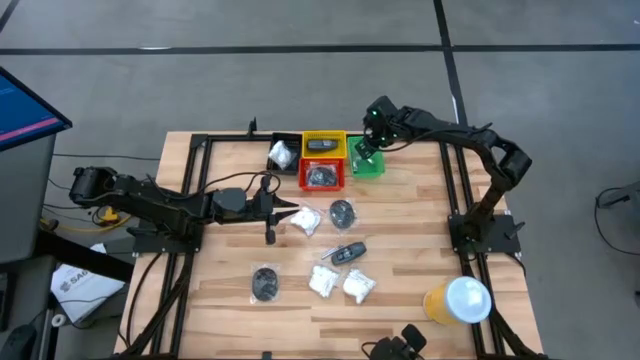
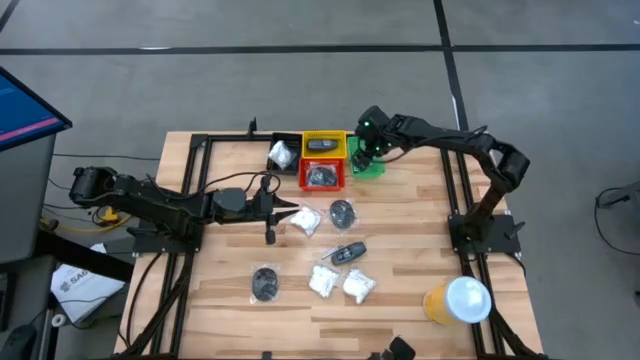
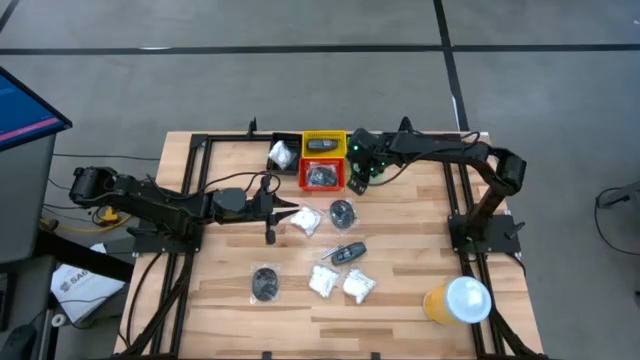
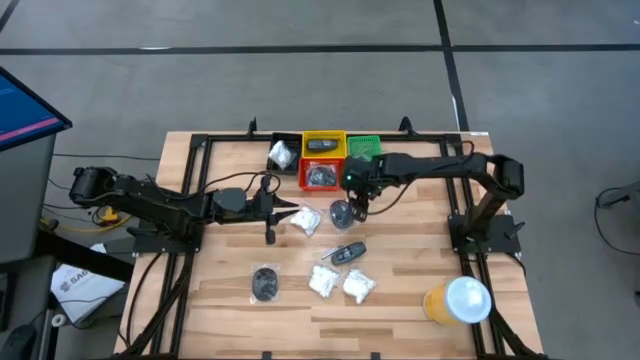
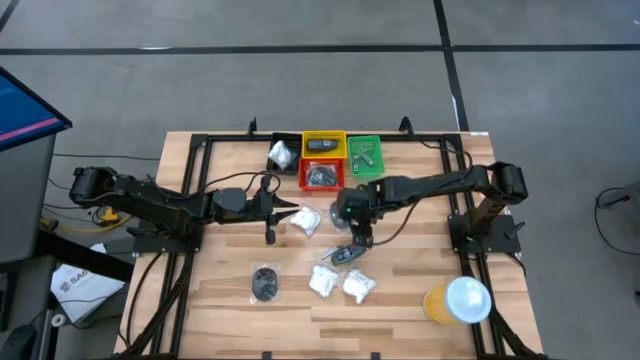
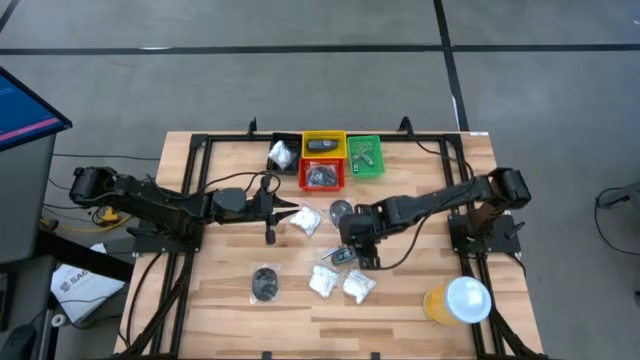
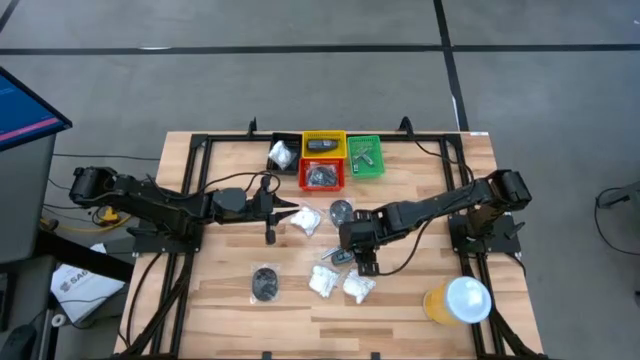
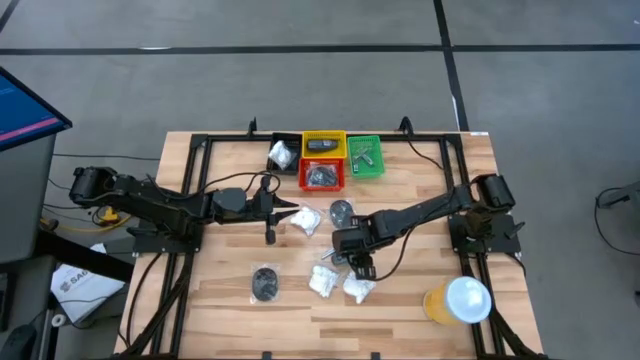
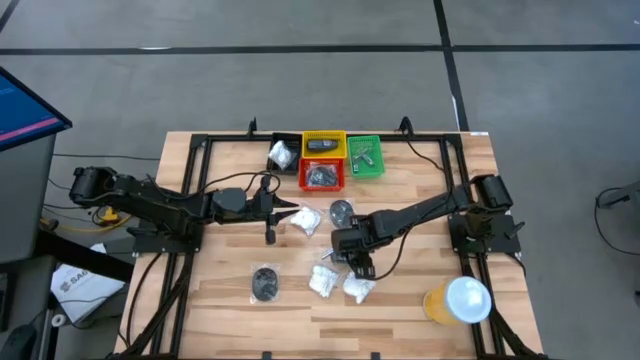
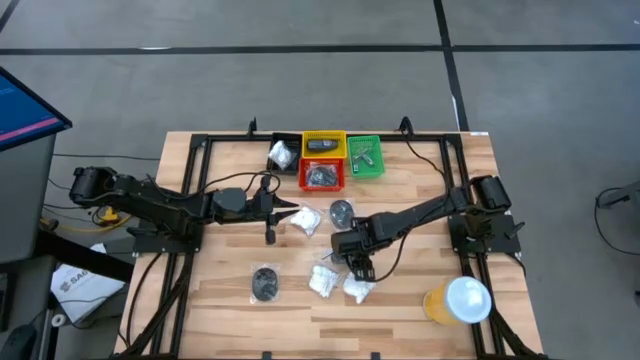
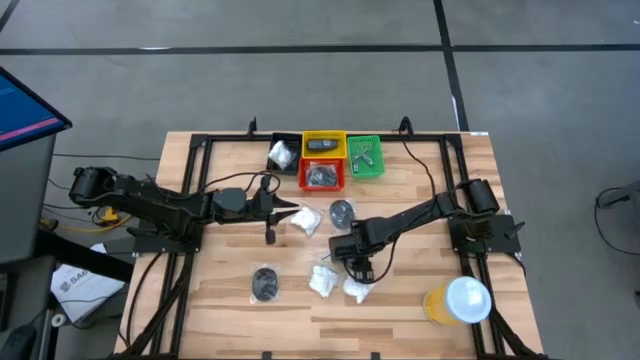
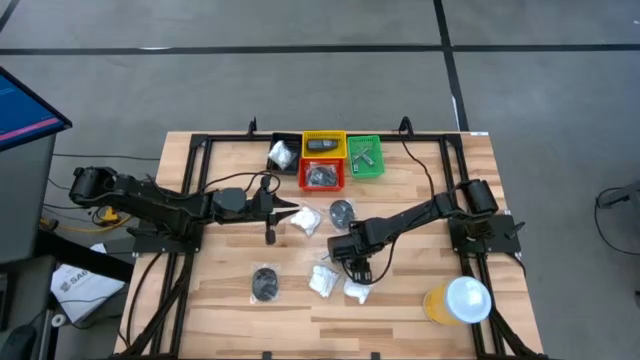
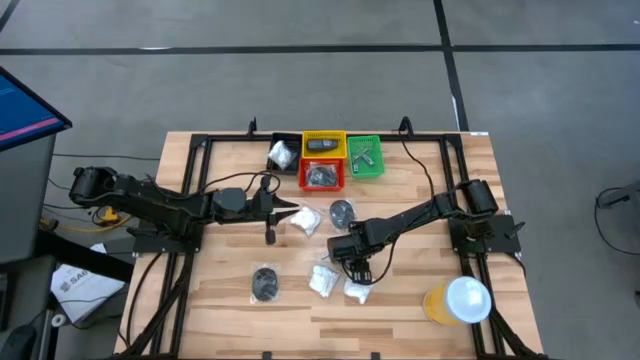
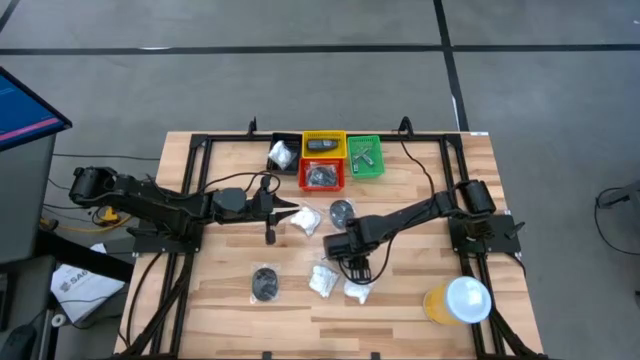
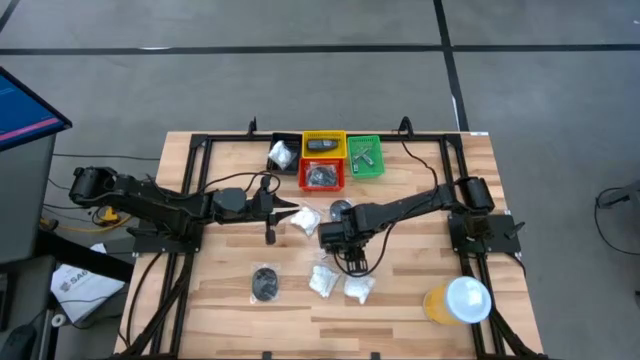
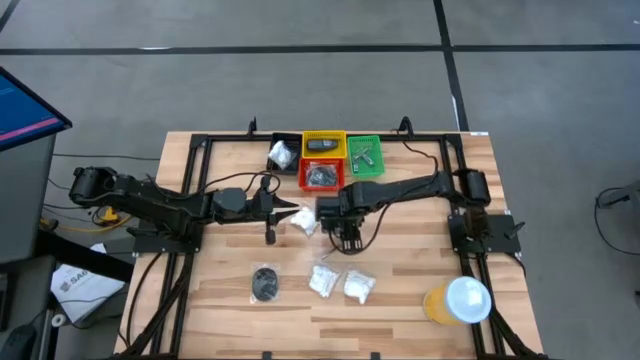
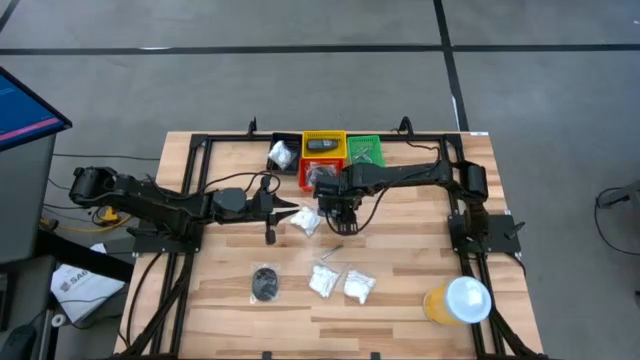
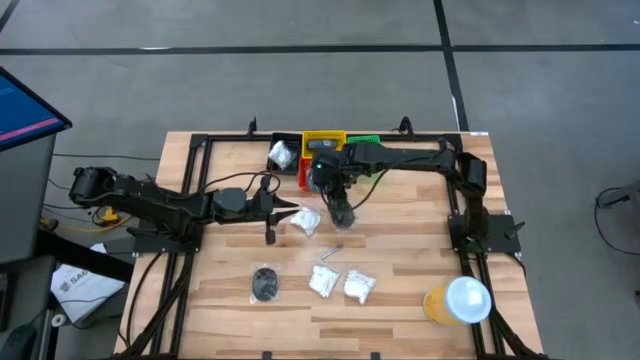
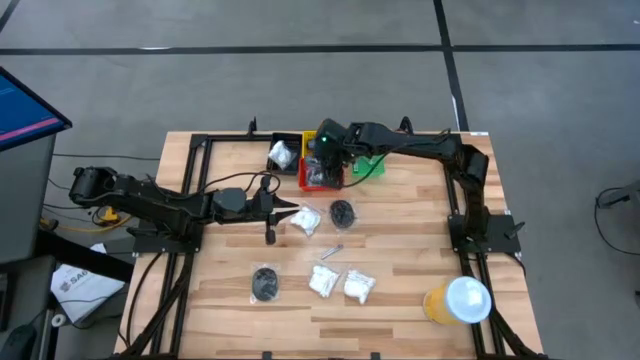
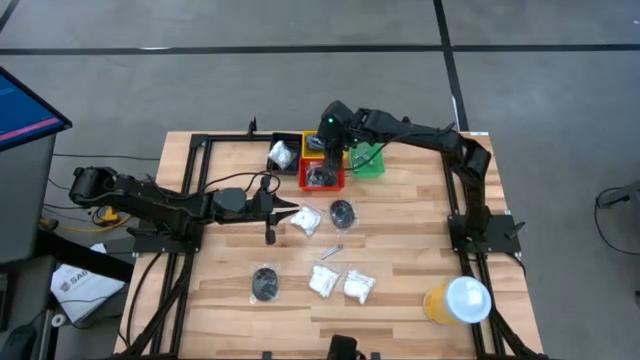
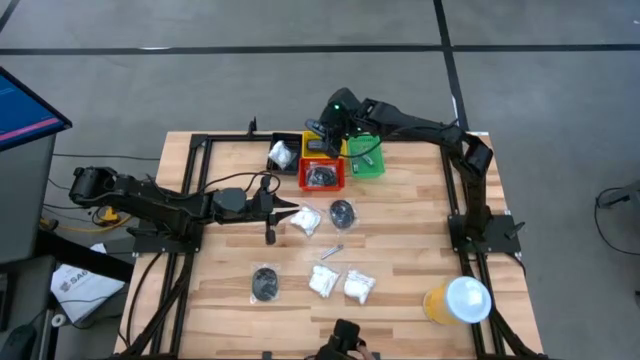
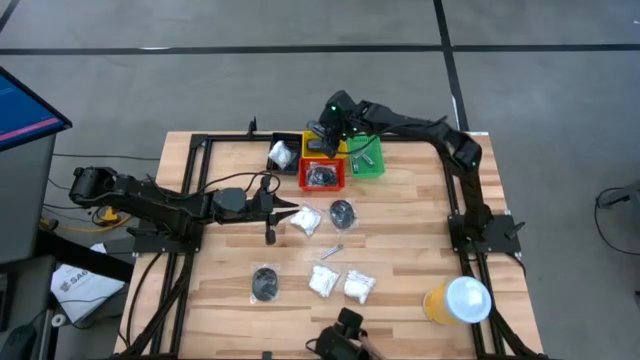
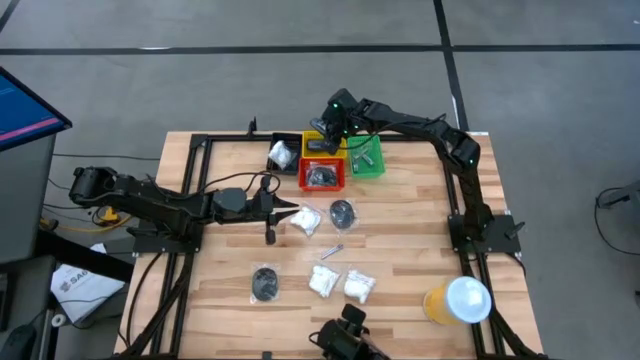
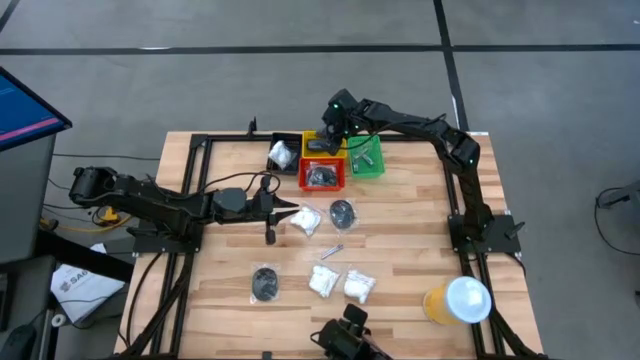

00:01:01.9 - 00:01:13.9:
Task: Pick & Place Travel size toiletries
Put the black deodorant into the yellow bin

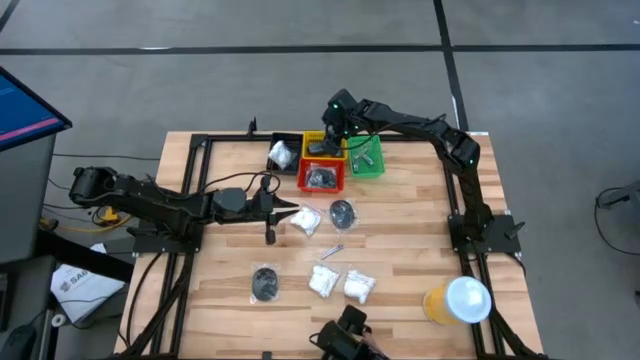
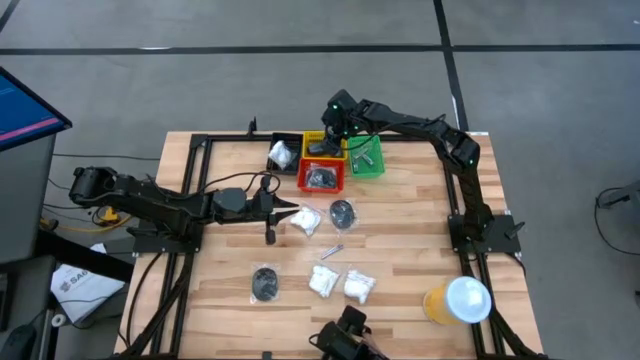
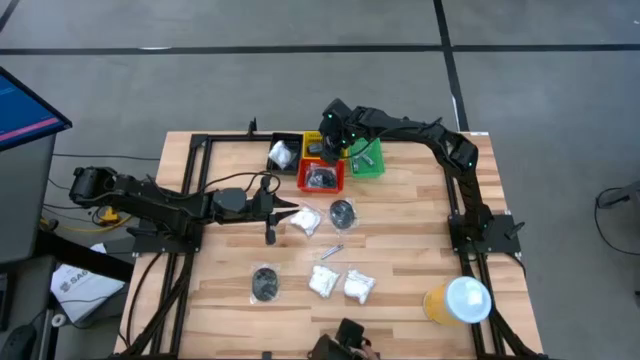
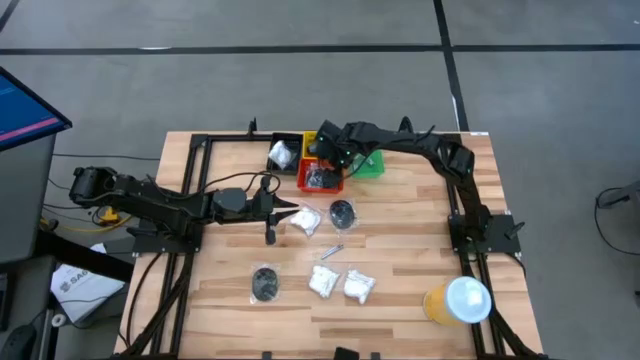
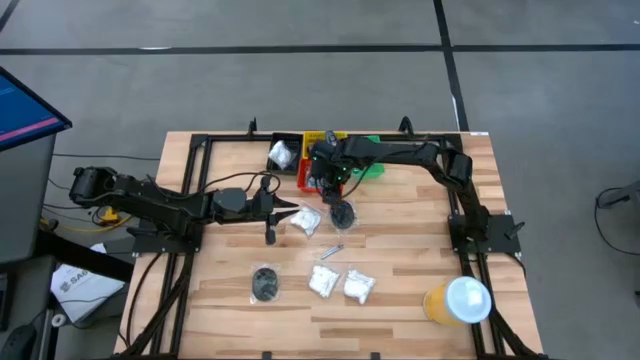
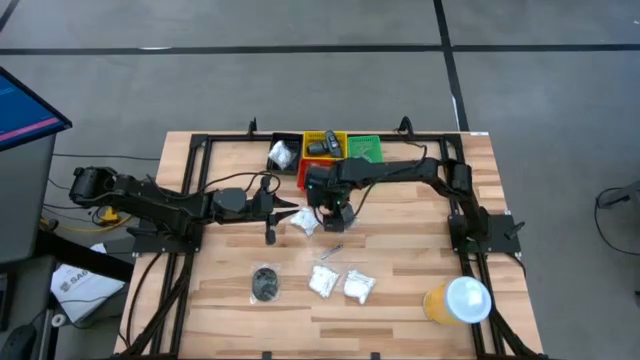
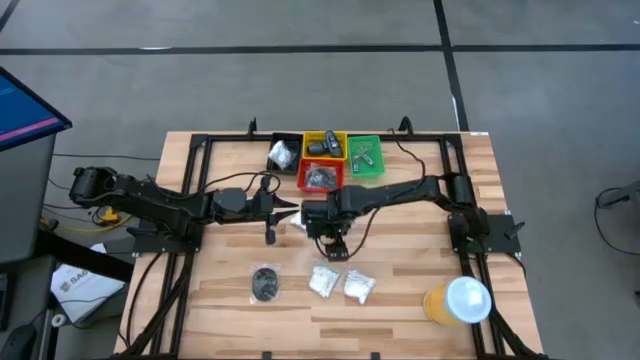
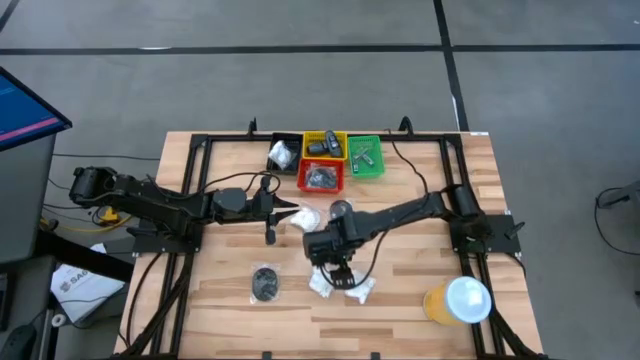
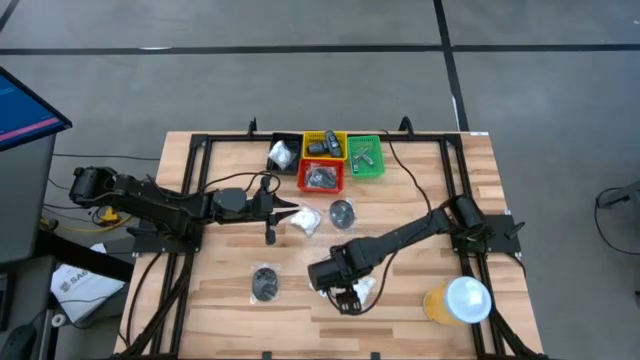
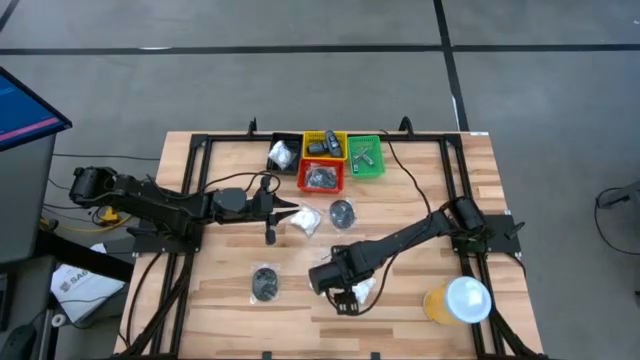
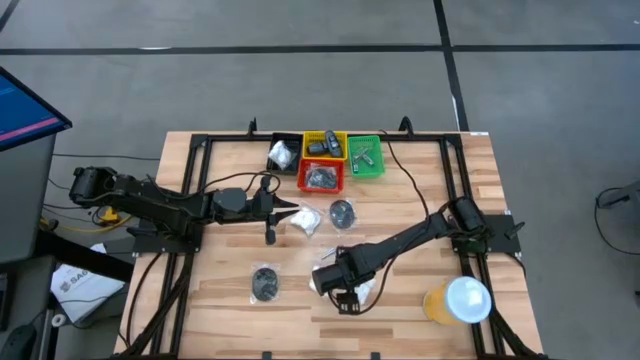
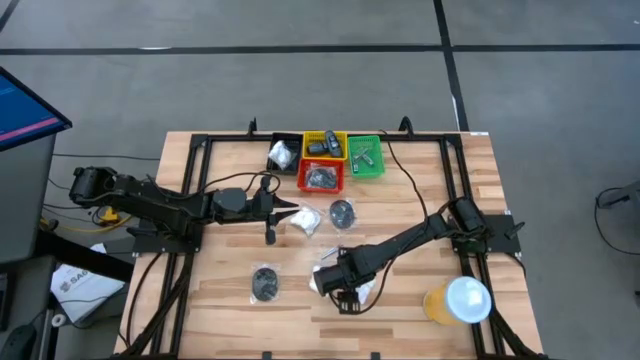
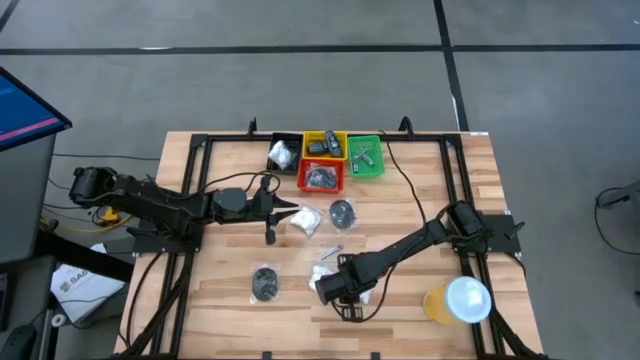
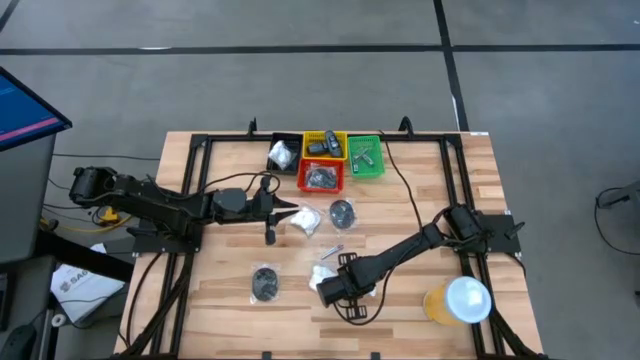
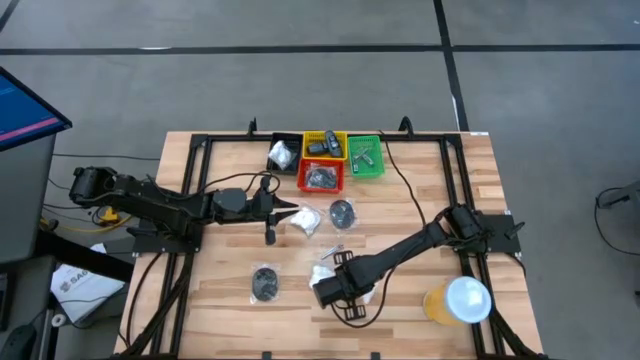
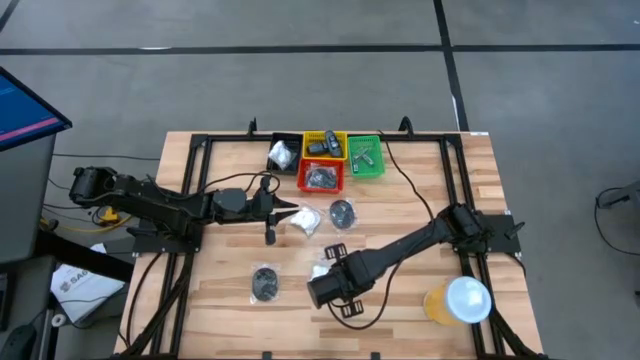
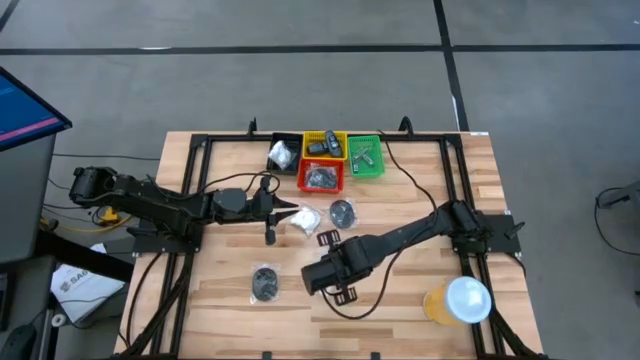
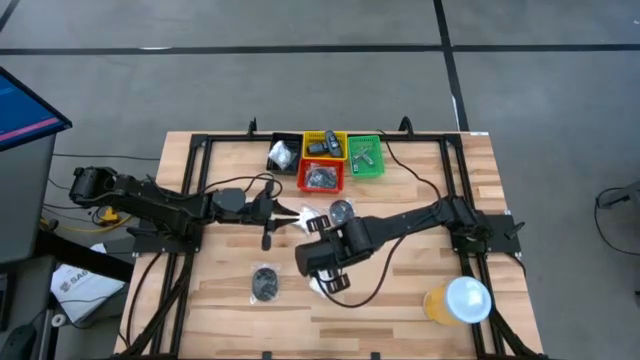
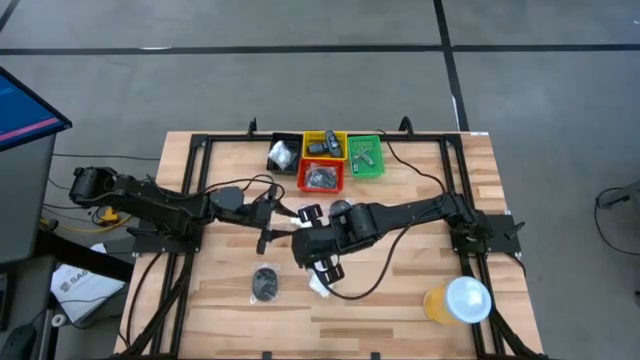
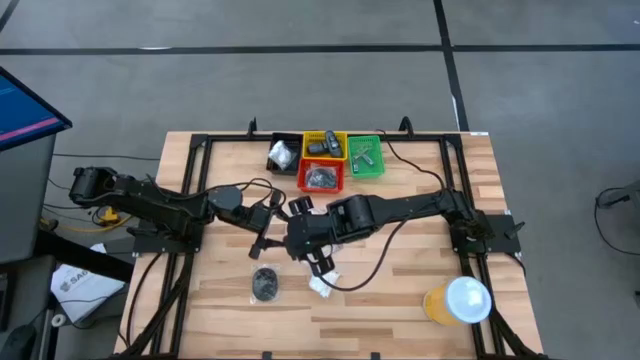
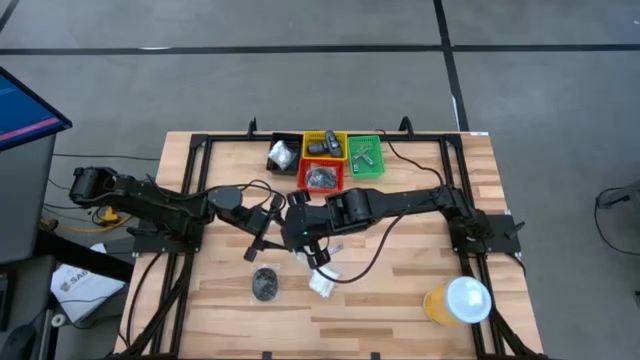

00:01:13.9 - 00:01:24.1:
Put the cotton pack into the black bin
